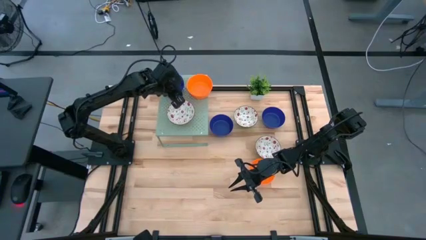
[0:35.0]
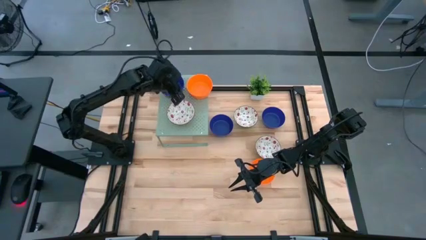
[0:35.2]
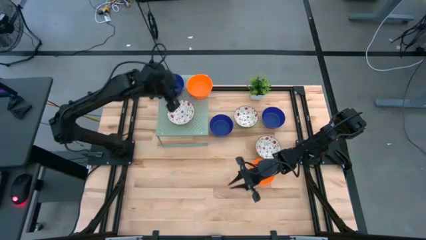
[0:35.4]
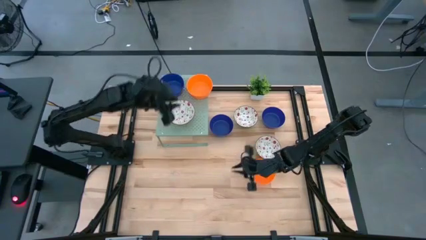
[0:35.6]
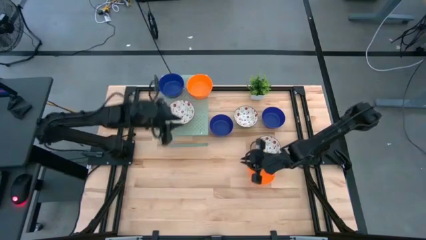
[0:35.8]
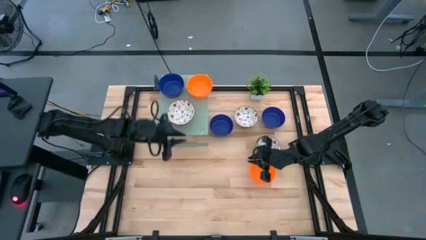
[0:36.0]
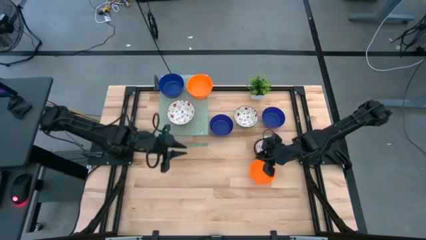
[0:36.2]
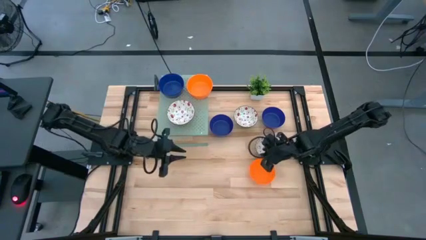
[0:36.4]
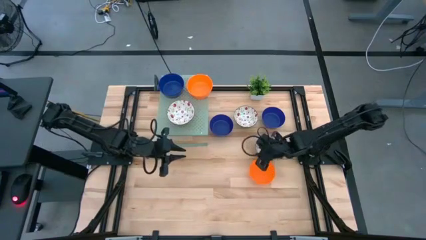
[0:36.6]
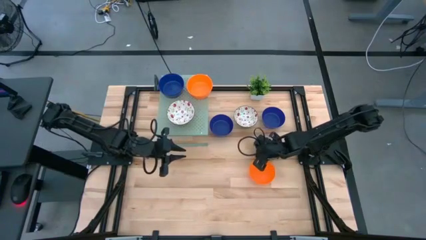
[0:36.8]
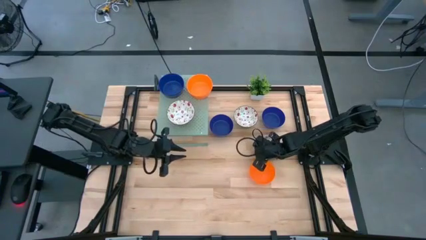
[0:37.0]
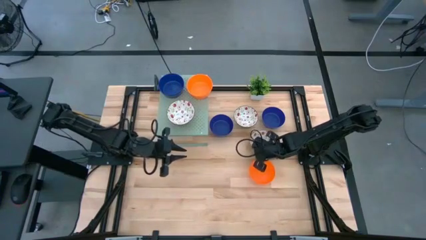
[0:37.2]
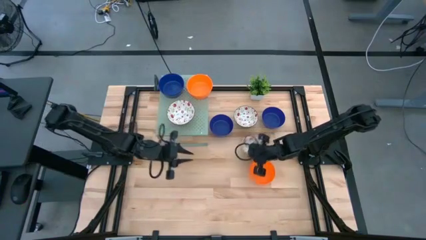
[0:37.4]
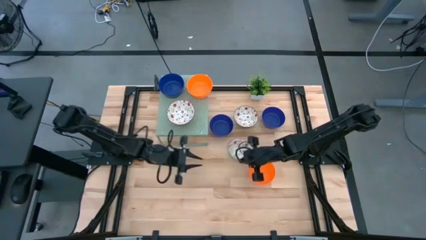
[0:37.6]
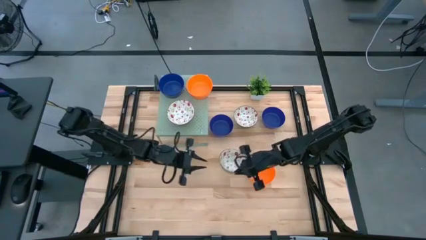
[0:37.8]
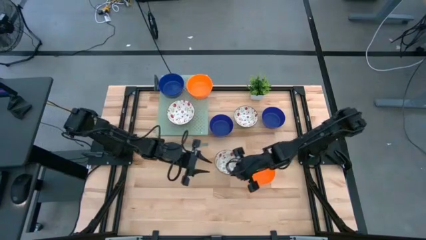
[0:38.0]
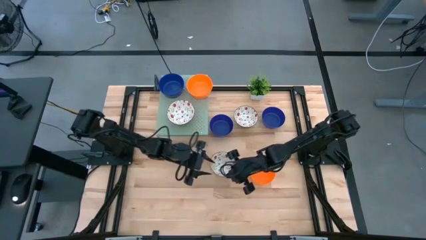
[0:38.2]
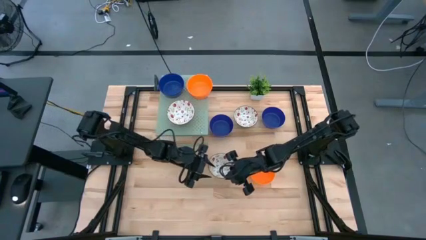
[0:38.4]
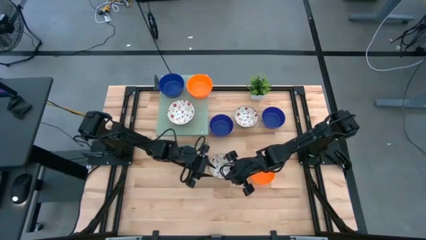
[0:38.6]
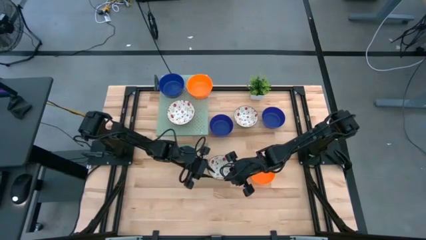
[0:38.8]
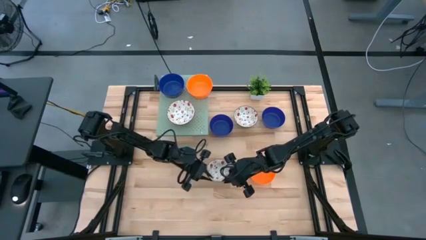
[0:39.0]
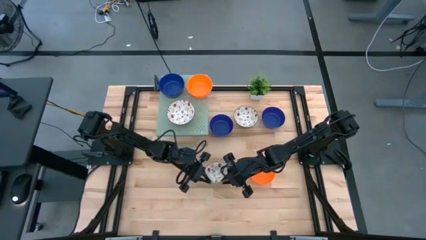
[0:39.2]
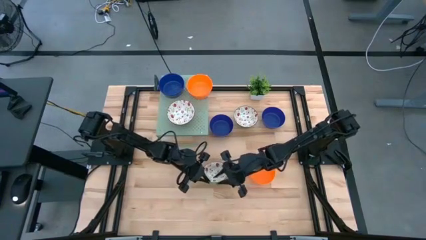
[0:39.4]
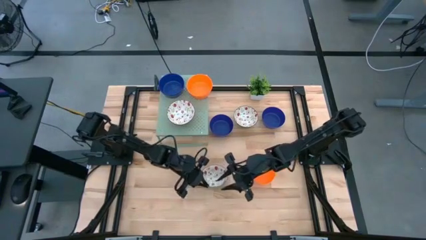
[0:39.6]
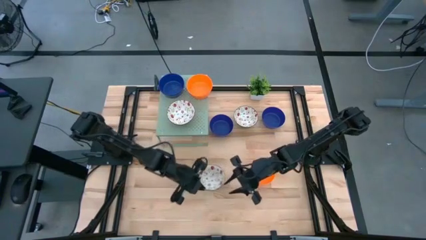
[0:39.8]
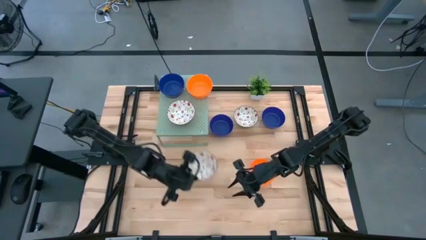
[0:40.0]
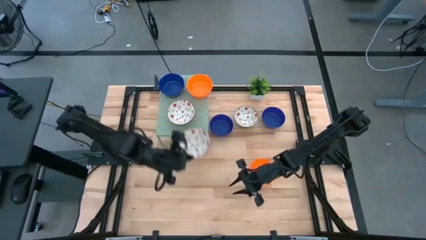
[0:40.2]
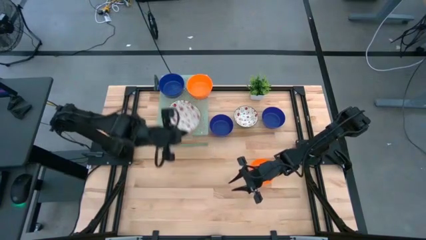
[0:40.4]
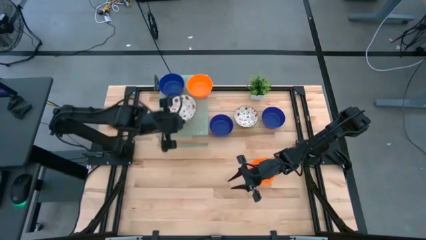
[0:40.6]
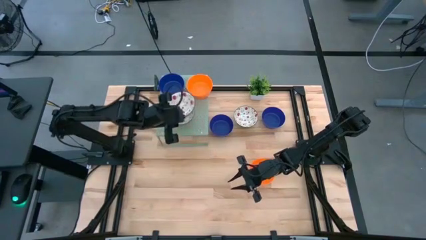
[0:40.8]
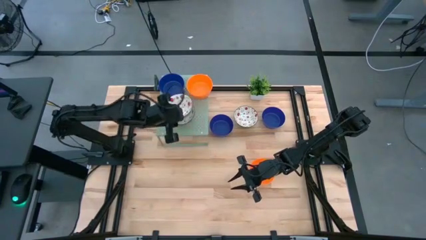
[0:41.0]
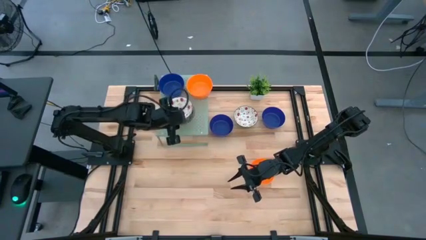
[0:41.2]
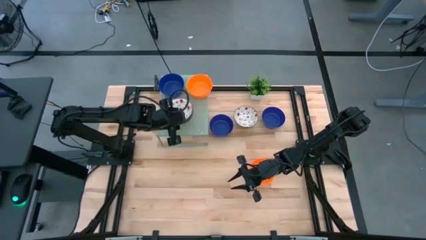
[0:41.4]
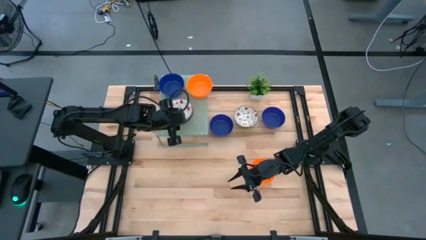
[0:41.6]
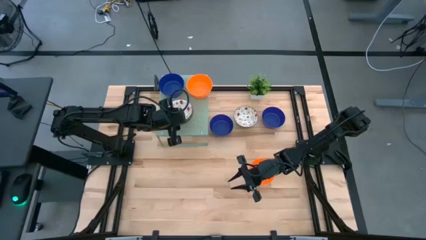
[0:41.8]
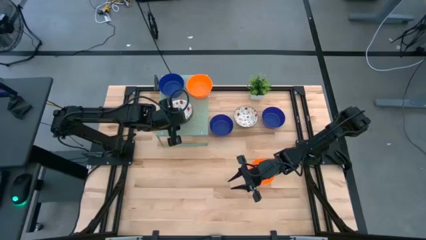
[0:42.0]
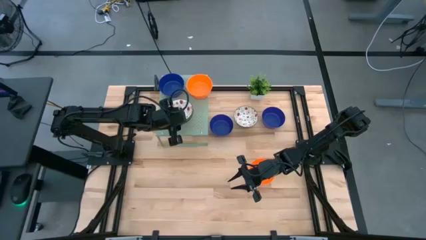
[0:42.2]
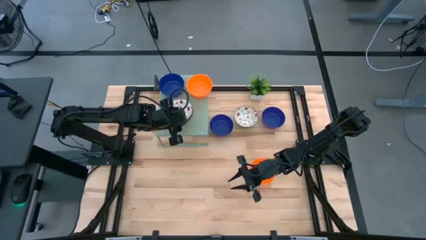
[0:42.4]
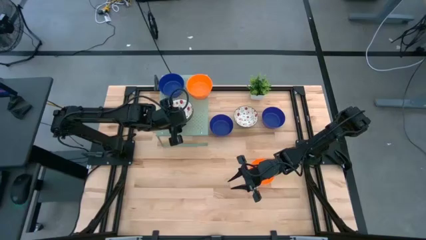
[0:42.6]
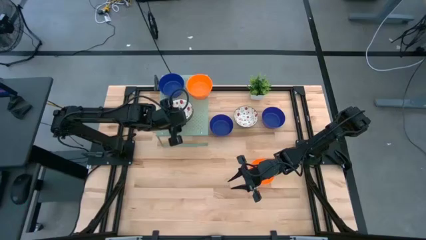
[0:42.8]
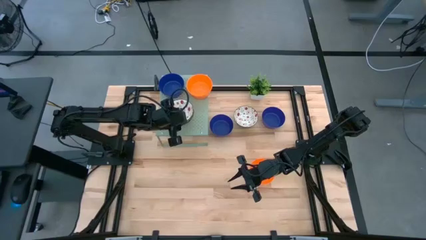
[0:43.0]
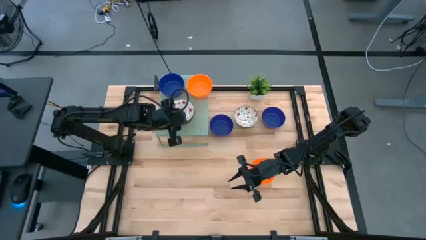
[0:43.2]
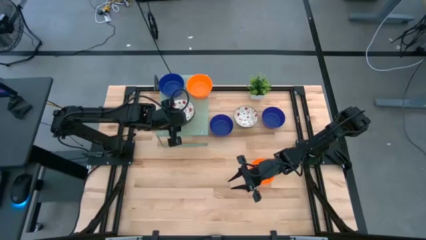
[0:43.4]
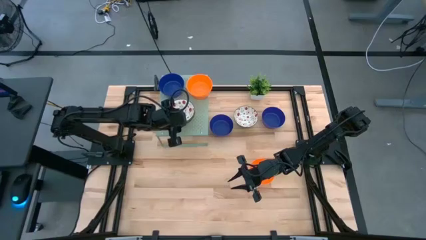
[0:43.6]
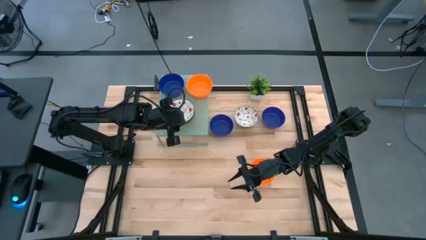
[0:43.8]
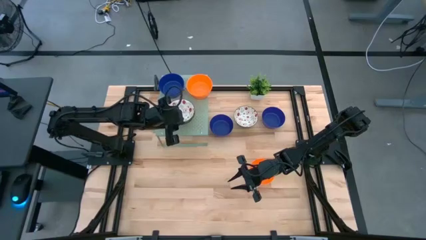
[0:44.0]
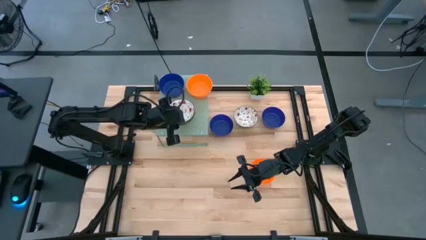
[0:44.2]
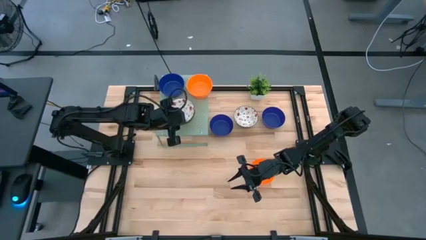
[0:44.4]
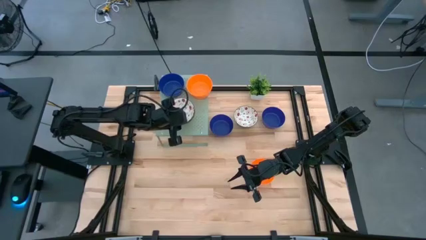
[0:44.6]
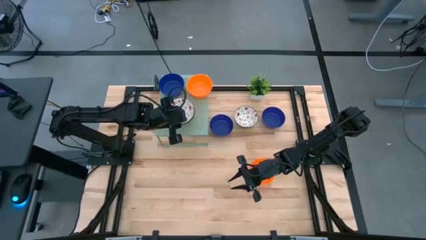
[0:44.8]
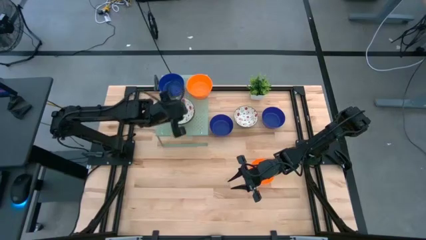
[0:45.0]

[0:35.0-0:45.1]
Task: Pick & Place Mini bowls
Stack the middle right white bowl on the other white bowl on the shelf

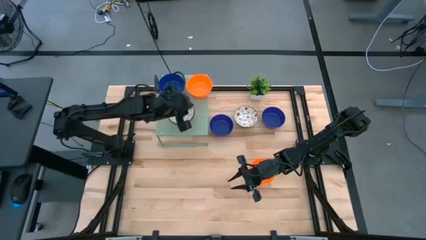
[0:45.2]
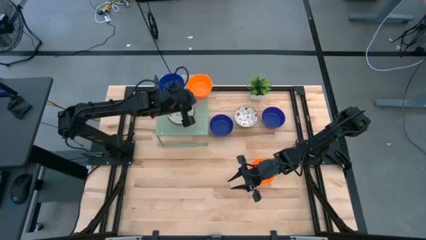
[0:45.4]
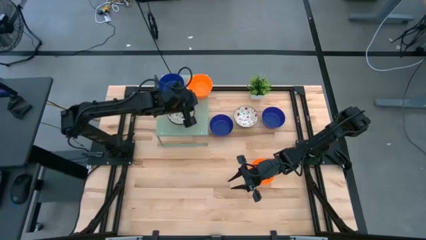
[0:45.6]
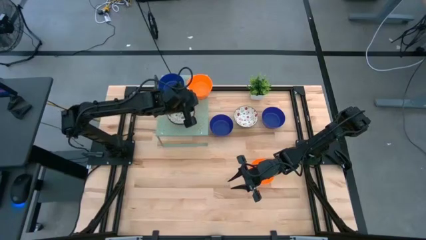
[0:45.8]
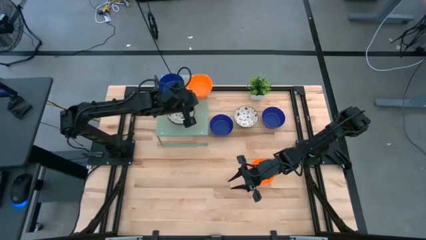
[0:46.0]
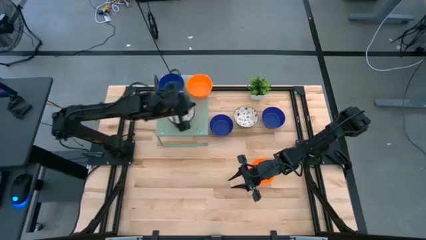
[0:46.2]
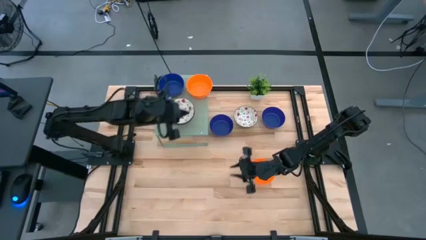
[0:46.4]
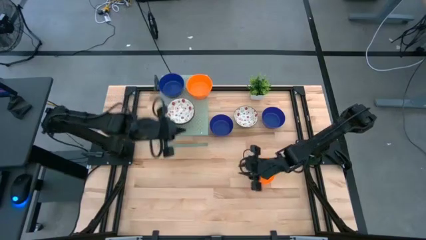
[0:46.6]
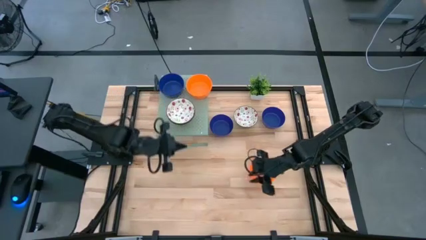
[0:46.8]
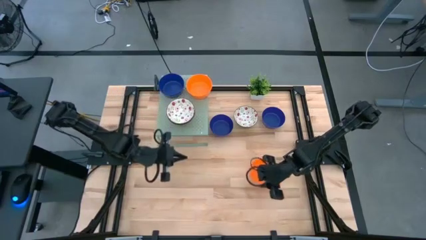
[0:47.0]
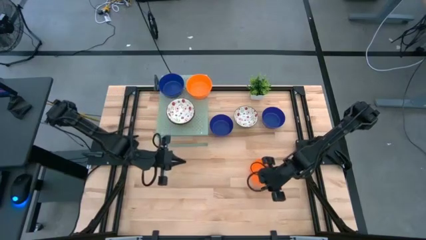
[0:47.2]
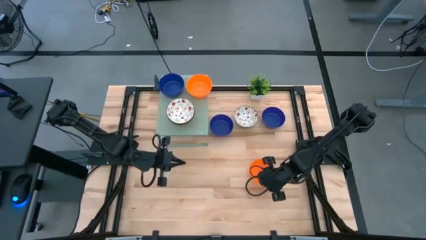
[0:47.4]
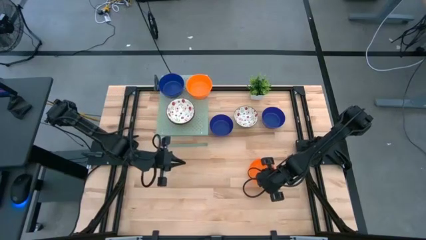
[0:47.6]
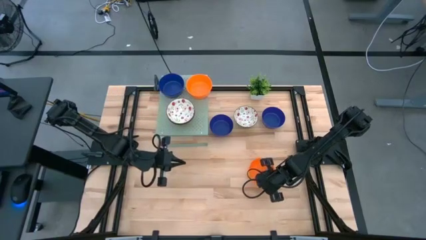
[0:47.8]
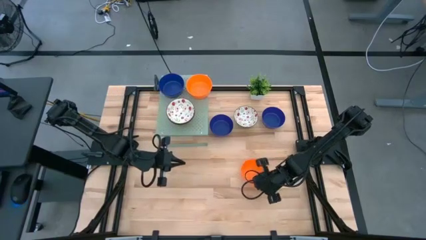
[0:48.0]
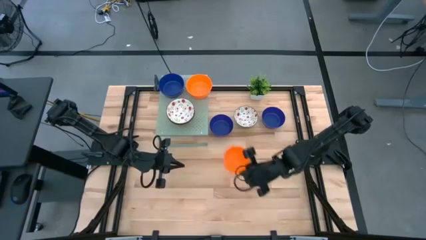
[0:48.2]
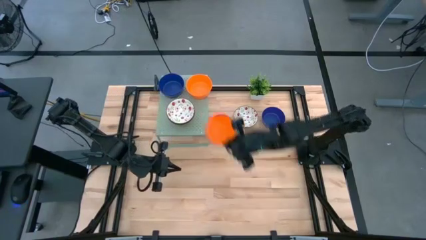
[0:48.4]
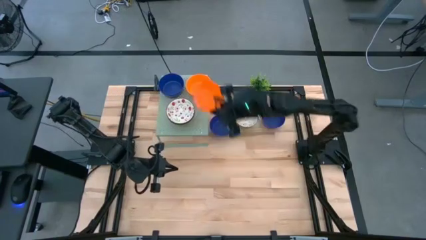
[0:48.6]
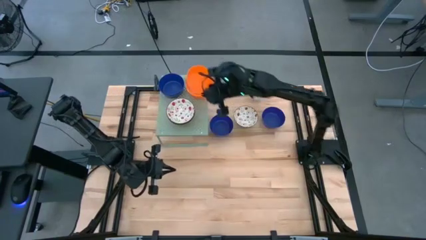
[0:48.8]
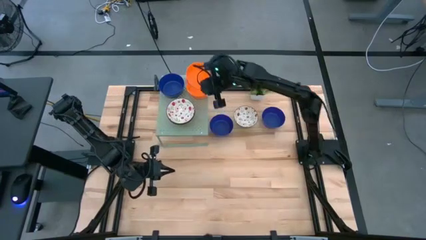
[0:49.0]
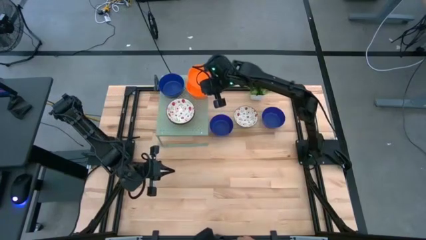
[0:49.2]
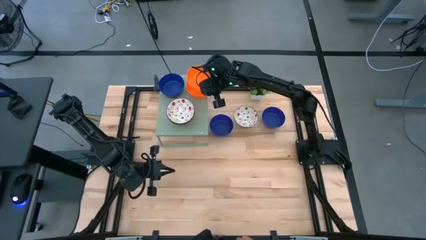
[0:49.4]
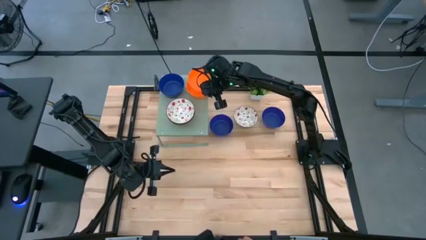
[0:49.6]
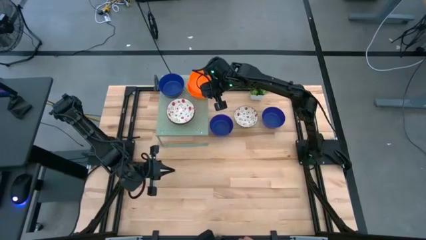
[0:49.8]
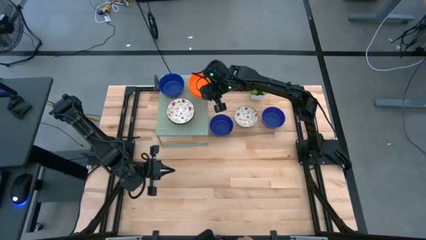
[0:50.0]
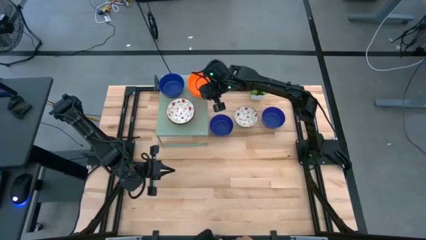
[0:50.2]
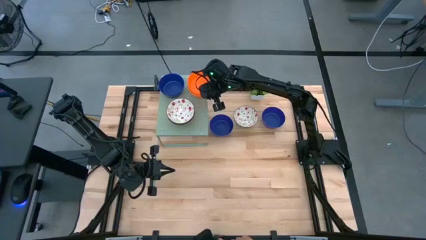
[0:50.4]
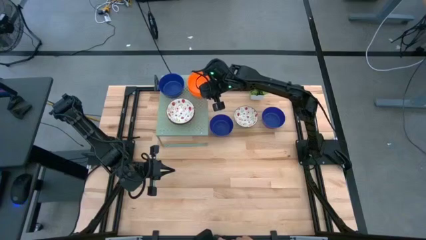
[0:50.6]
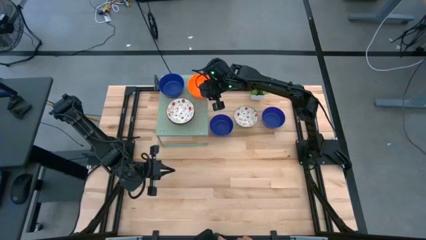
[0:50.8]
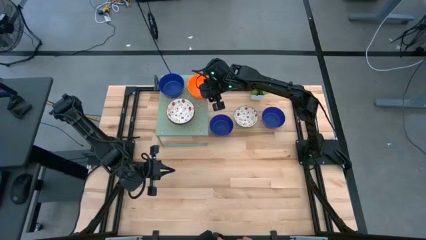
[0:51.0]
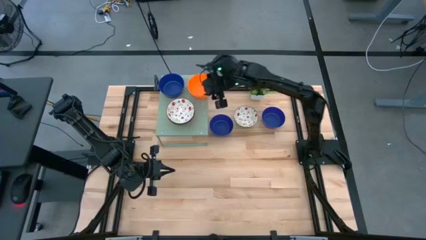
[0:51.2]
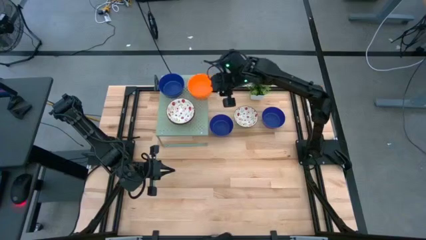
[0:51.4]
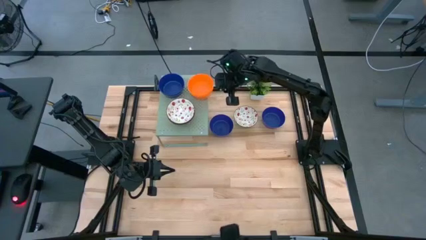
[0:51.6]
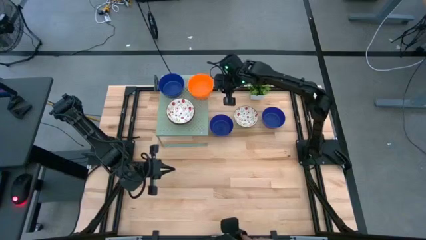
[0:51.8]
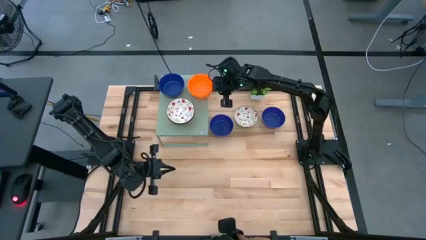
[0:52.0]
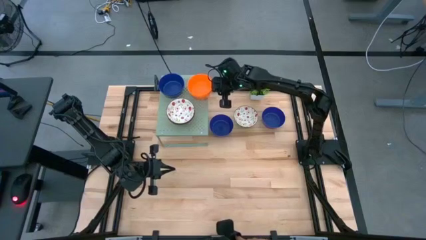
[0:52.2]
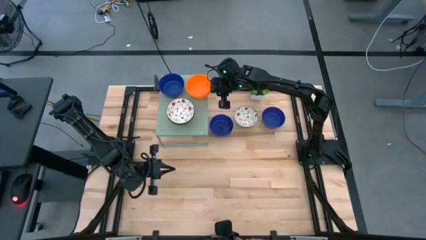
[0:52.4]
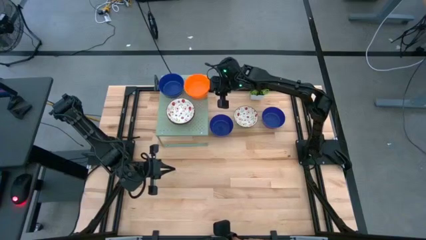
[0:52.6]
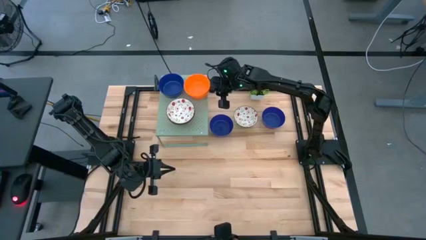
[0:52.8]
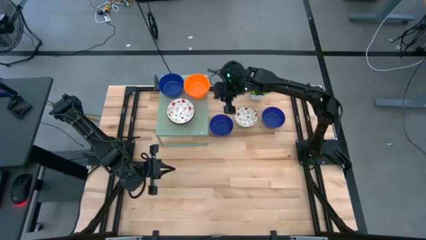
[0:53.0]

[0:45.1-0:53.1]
Stack the orange bowl on the other orange bowl on the shelf
